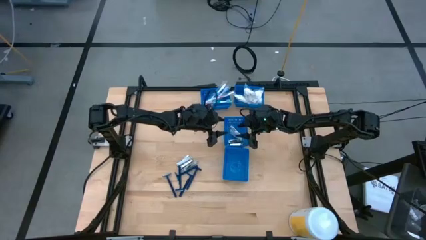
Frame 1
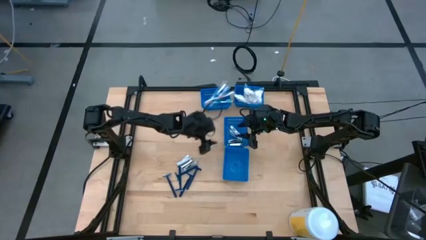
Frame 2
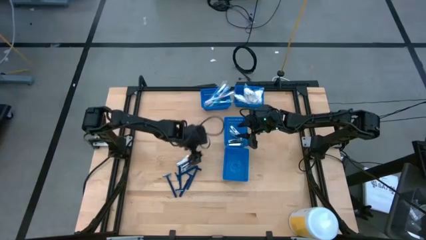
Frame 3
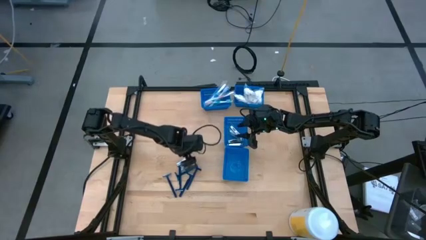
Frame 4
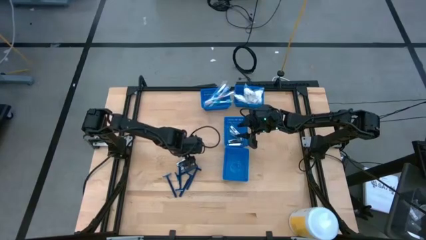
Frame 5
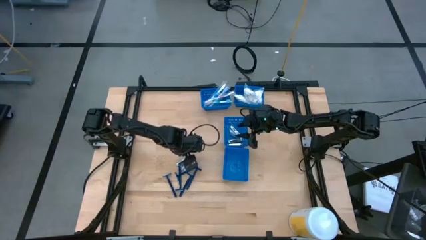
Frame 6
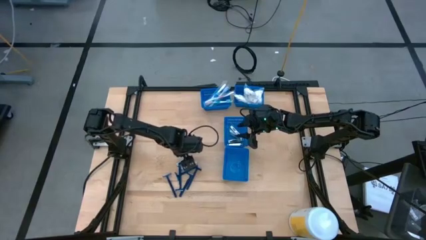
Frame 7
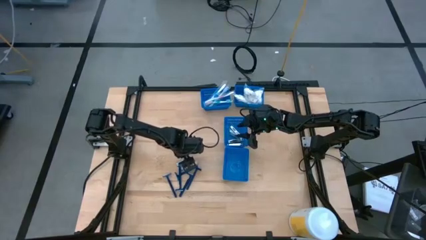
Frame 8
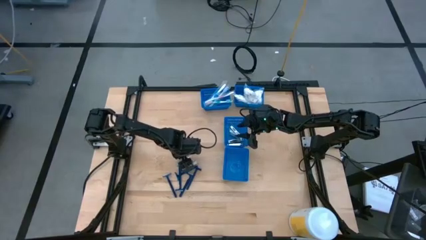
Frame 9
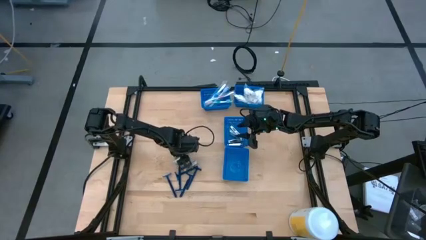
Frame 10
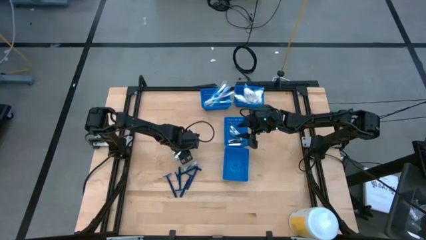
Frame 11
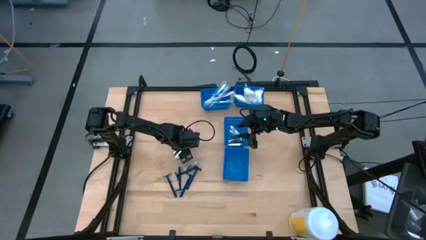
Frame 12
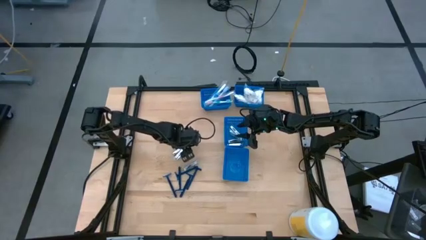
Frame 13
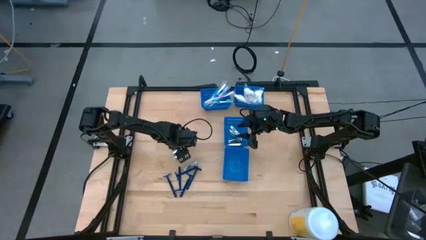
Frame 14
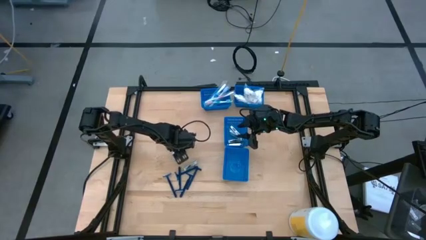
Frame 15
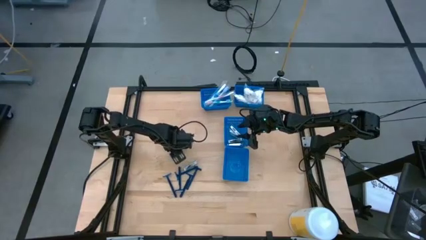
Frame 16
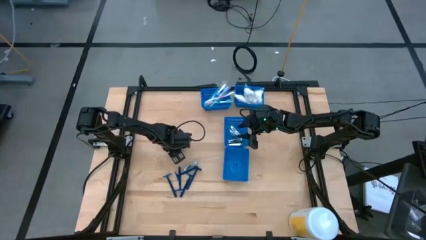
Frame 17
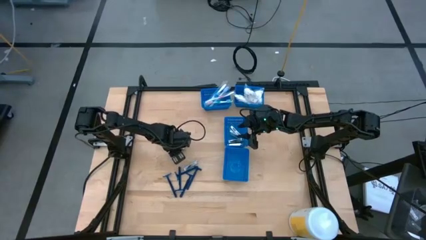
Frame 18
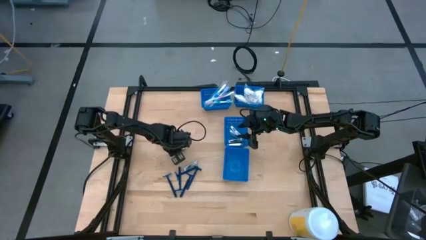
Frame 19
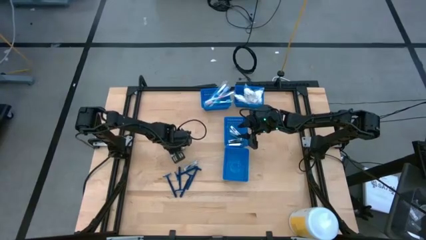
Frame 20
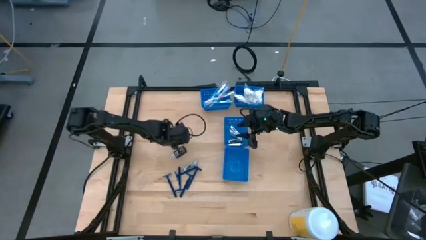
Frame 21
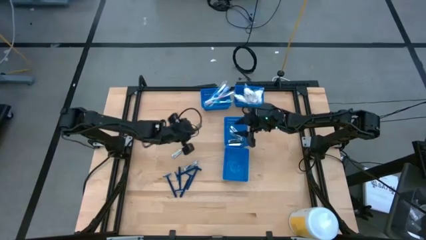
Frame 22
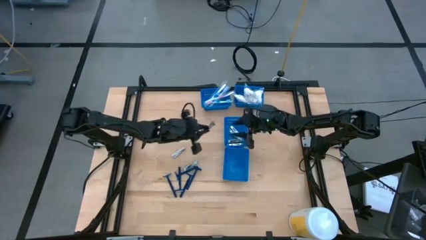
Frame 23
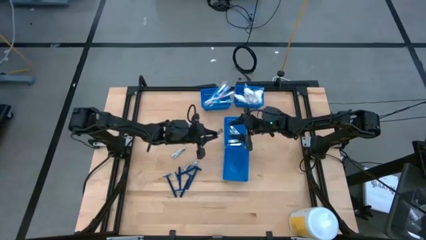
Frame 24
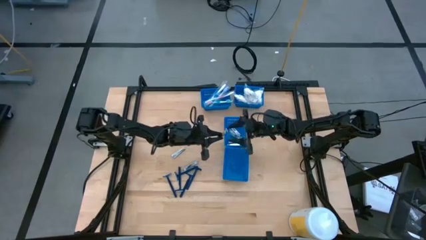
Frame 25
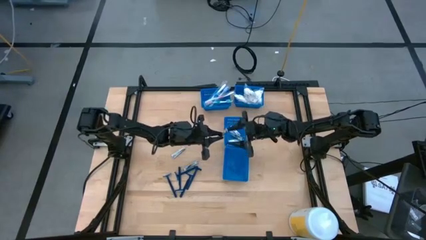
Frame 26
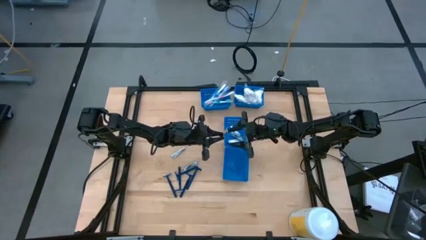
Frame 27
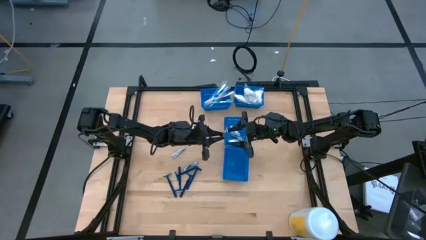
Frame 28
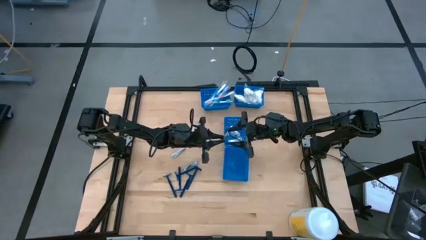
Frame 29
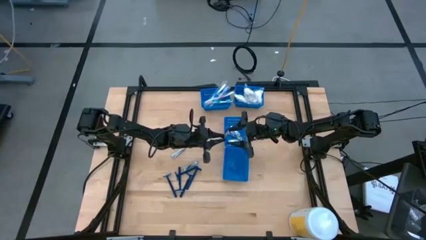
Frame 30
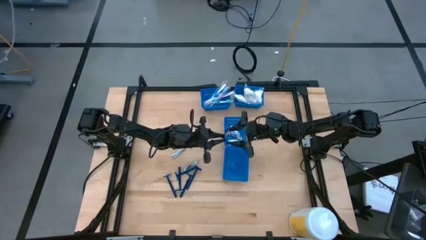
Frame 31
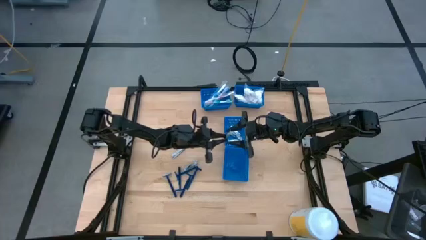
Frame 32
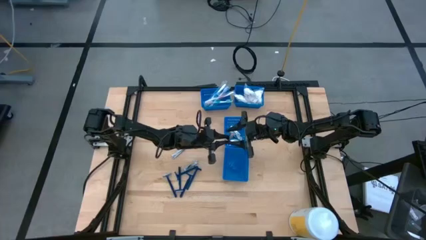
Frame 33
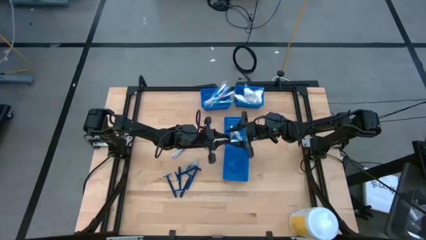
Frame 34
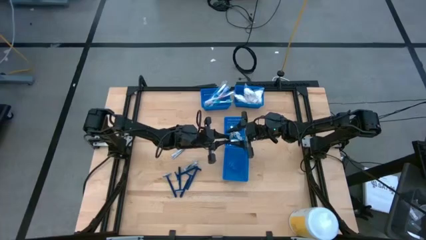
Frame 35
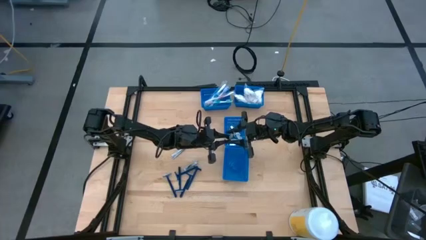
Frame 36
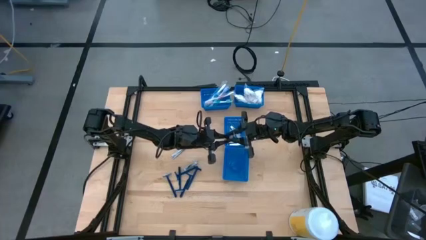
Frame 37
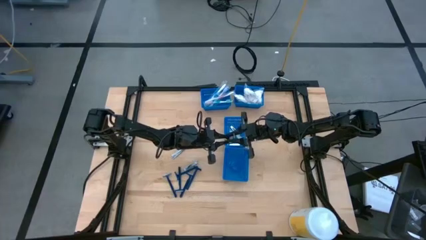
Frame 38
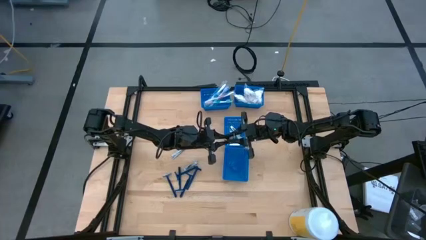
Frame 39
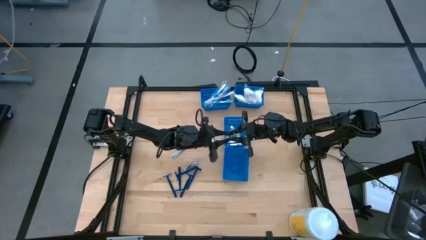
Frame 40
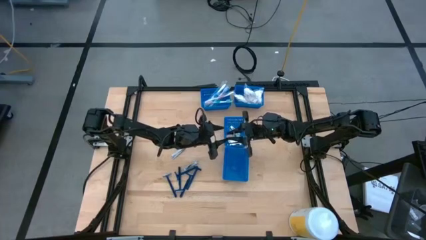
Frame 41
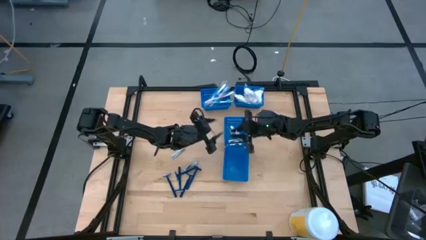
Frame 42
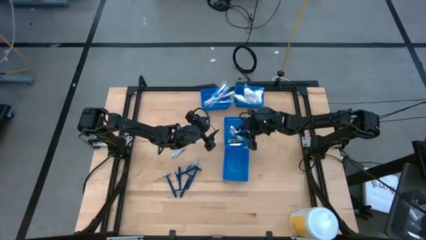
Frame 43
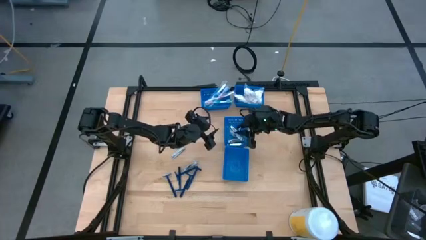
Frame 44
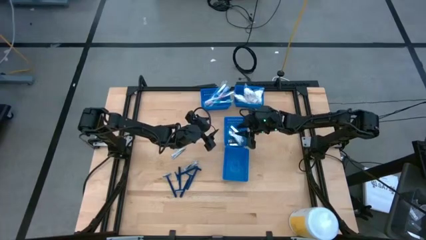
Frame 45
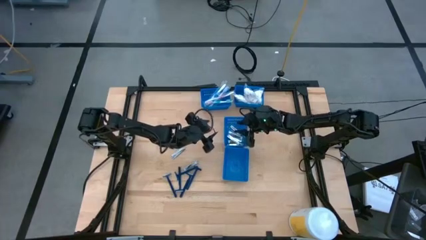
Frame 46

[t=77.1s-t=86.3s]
Task: Pick & Place Travel size toiletries
Put the nail clipper into the center blue bin

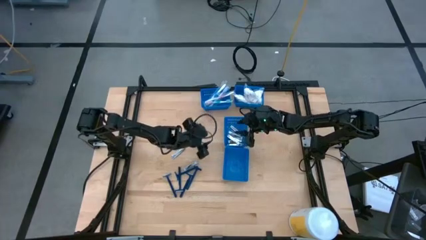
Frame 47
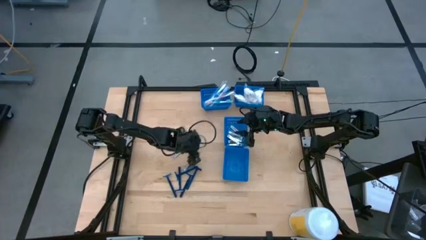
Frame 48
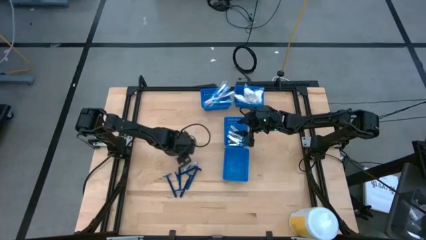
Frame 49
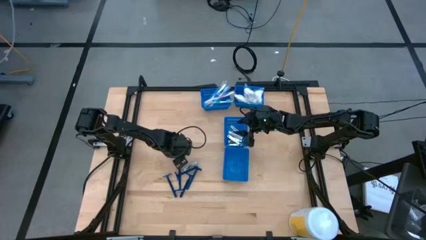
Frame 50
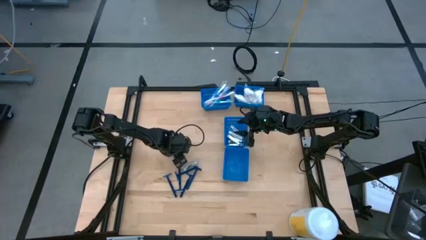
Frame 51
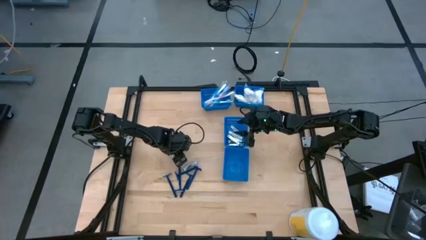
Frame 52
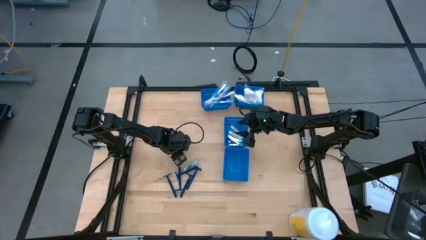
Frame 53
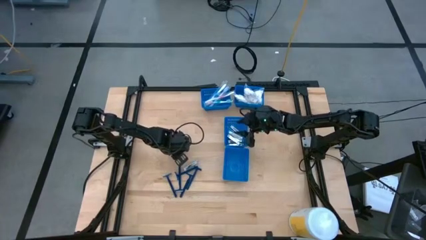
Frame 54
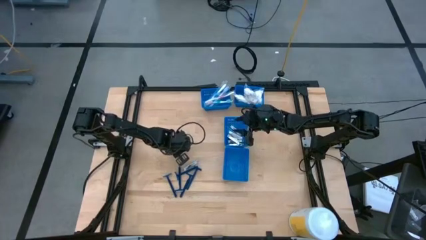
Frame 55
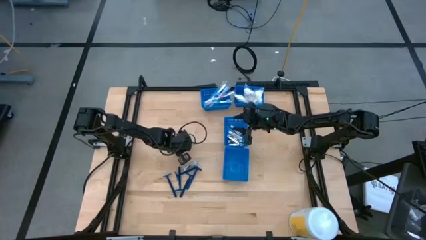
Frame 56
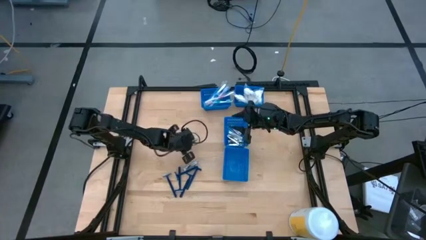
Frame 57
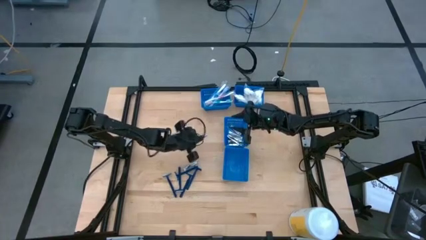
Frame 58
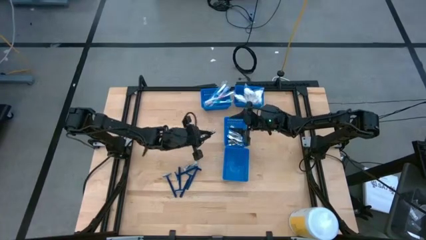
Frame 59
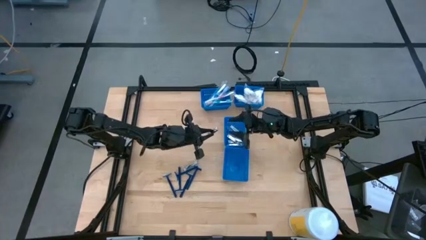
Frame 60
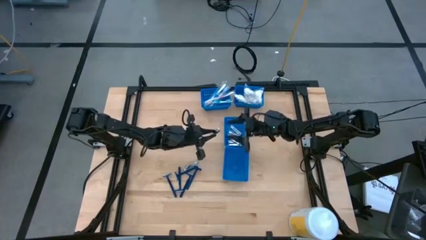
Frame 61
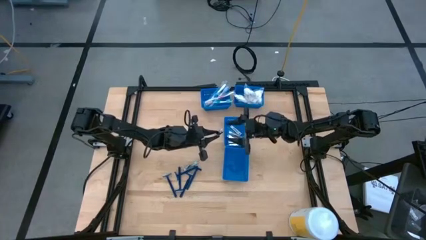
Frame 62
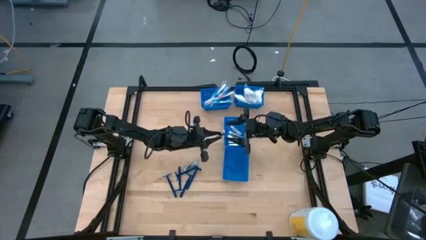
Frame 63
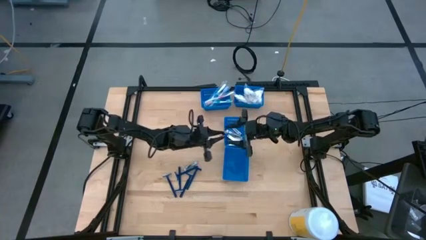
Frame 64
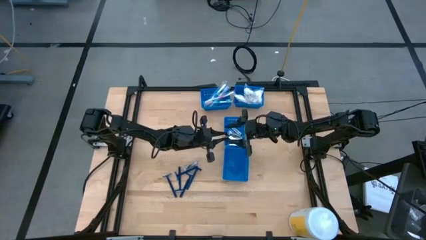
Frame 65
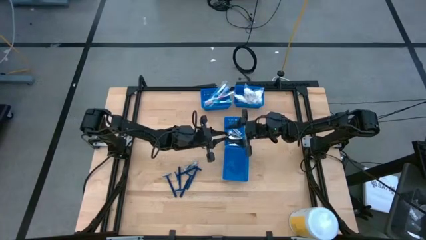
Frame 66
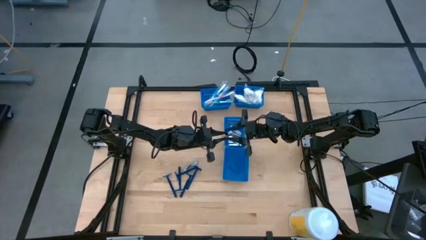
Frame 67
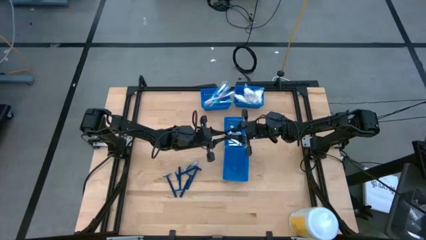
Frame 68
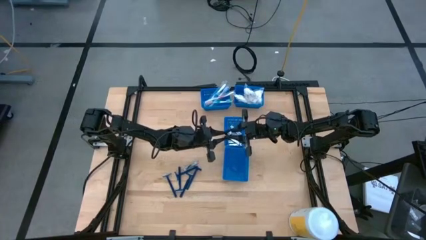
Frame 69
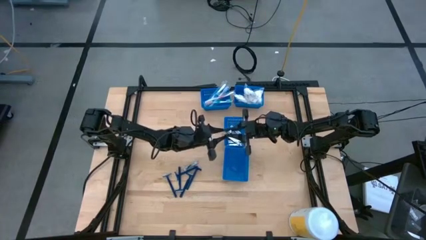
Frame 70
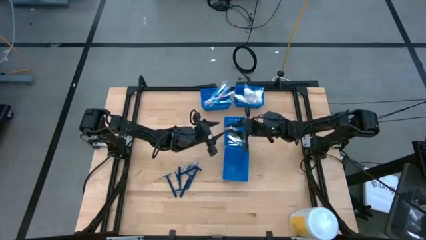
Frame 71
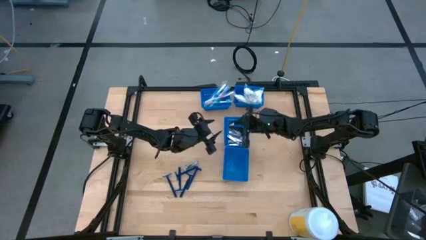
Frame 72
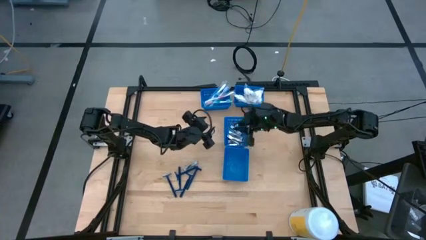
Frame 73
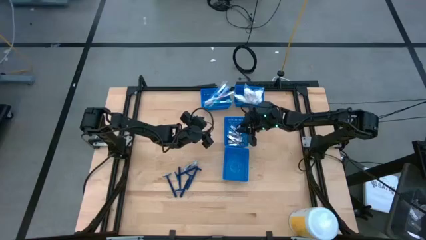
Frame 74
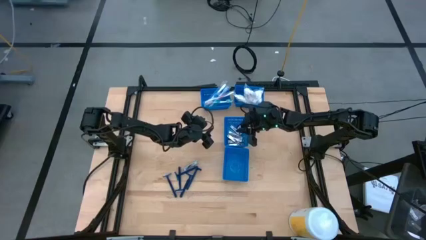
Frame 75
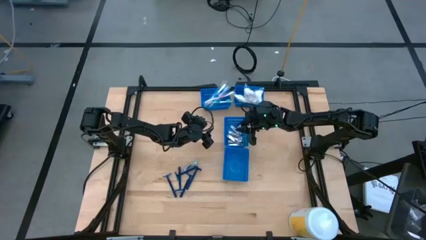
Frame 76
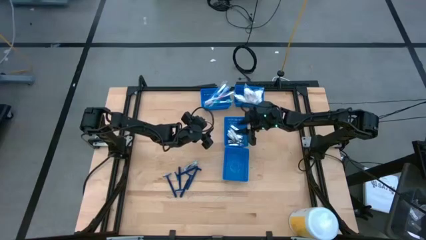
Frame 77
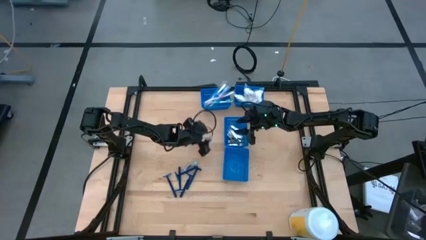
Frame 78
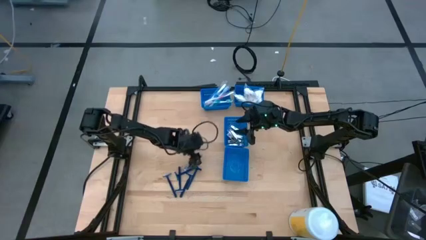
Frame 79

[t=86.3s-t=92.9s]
Put the nail clipper into the center blue bin
